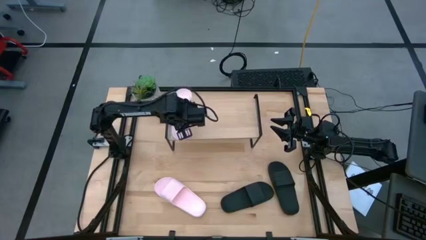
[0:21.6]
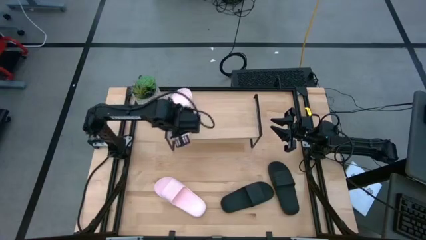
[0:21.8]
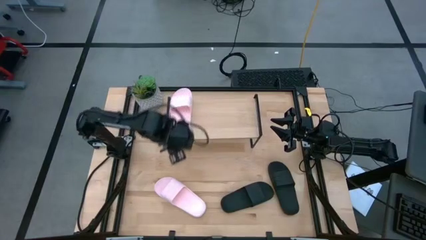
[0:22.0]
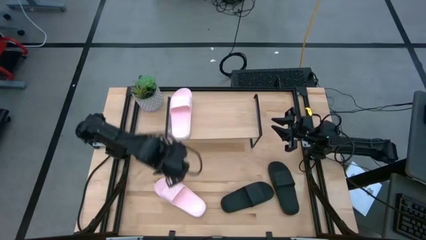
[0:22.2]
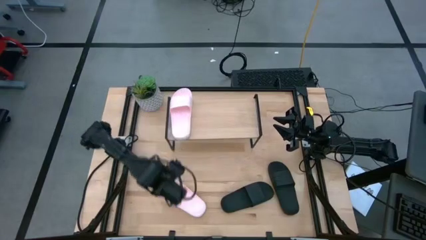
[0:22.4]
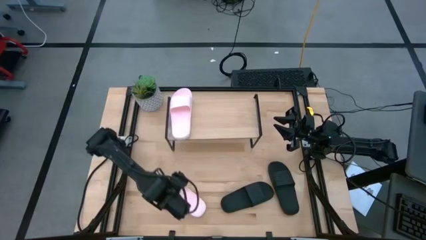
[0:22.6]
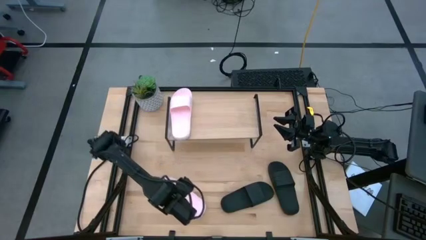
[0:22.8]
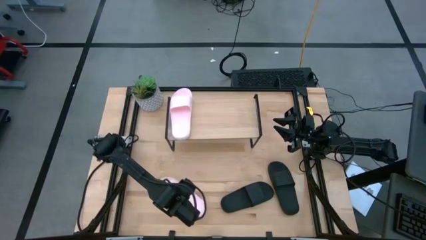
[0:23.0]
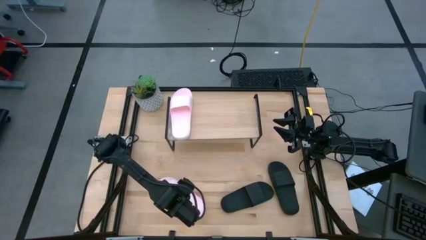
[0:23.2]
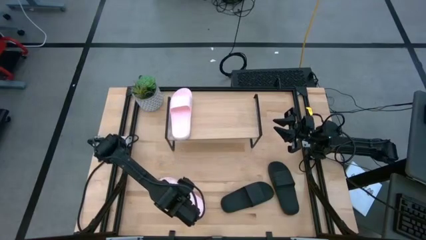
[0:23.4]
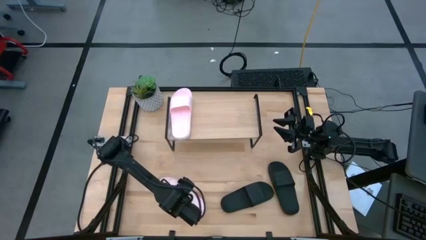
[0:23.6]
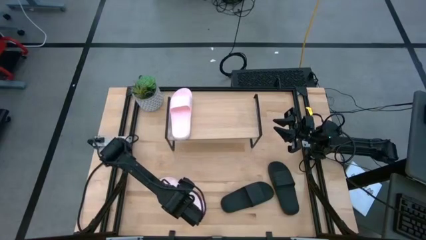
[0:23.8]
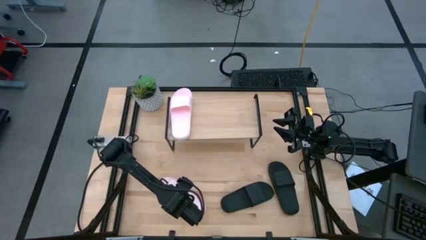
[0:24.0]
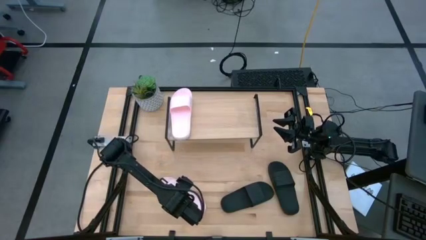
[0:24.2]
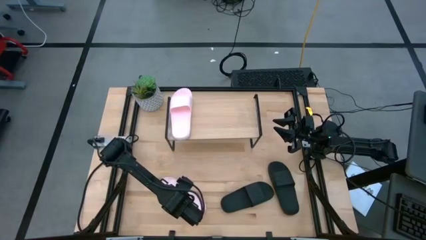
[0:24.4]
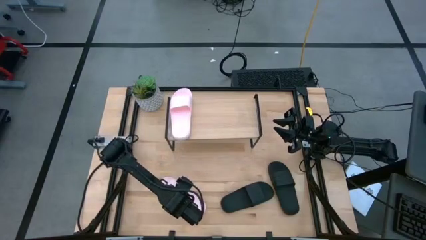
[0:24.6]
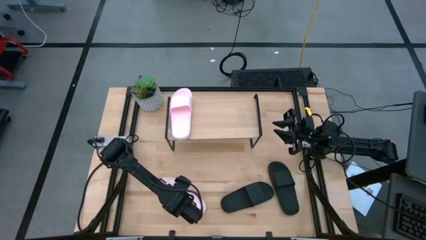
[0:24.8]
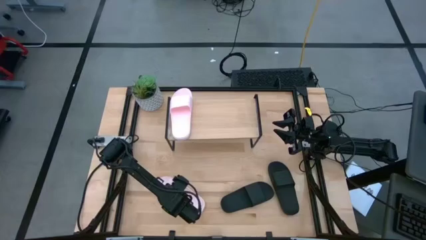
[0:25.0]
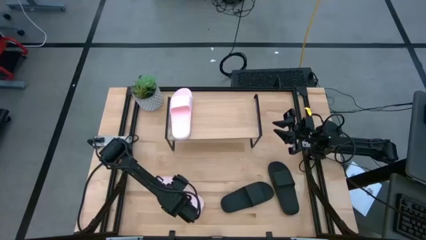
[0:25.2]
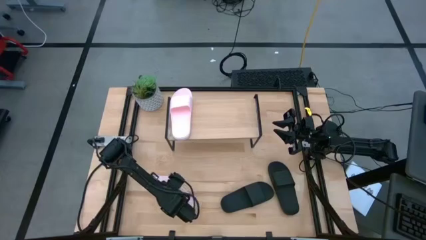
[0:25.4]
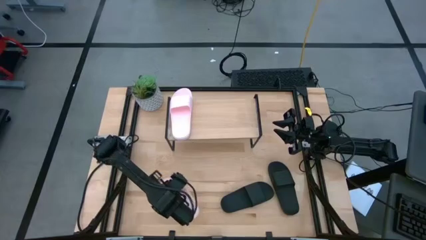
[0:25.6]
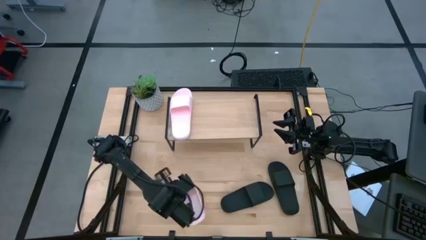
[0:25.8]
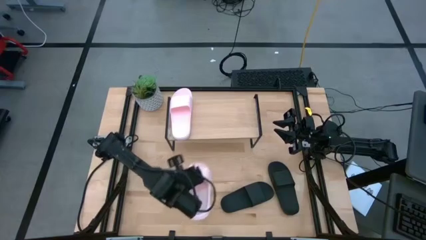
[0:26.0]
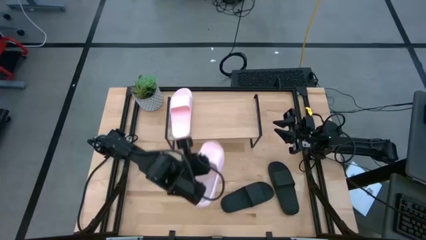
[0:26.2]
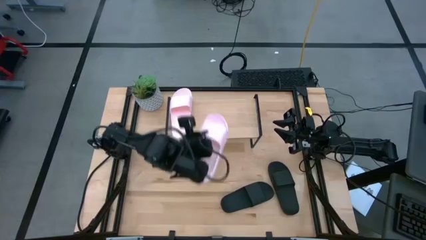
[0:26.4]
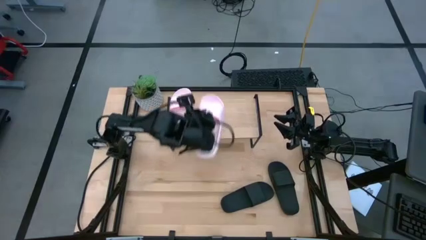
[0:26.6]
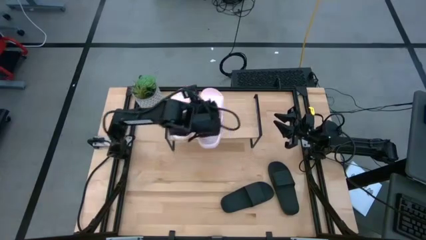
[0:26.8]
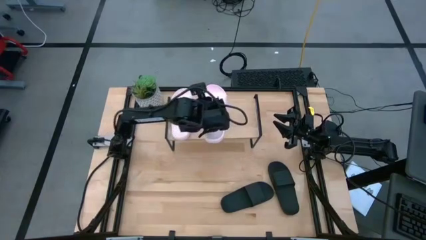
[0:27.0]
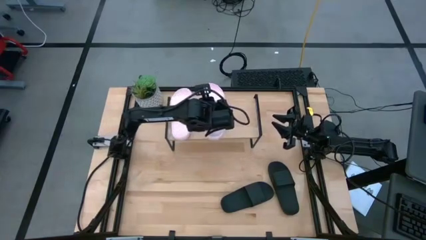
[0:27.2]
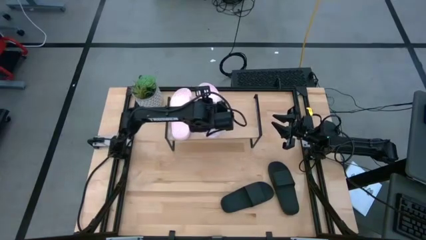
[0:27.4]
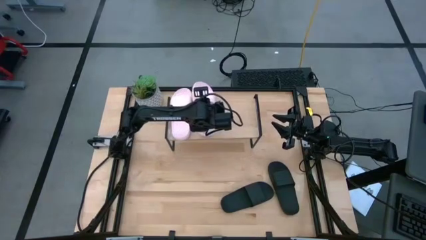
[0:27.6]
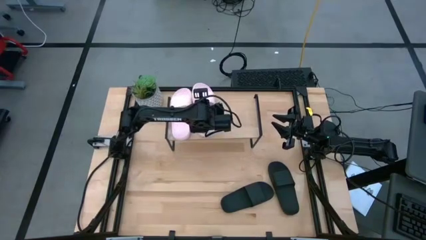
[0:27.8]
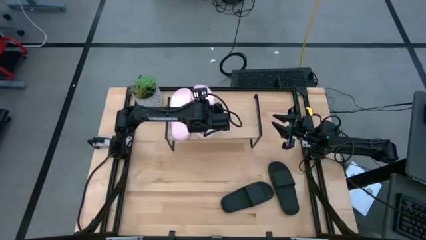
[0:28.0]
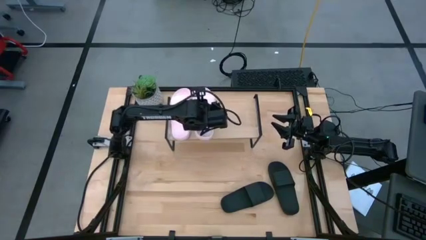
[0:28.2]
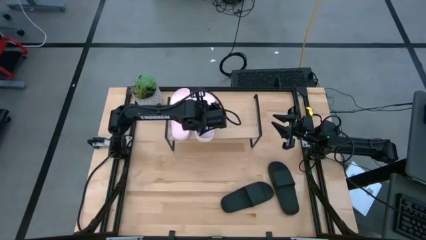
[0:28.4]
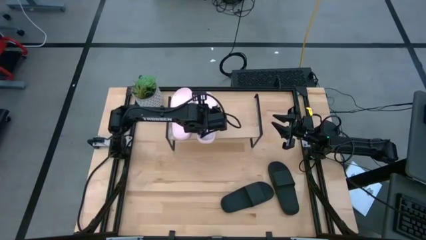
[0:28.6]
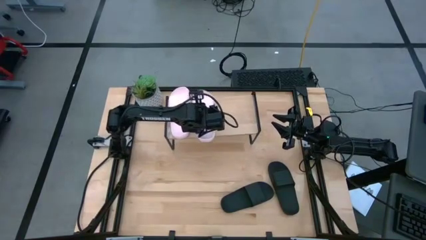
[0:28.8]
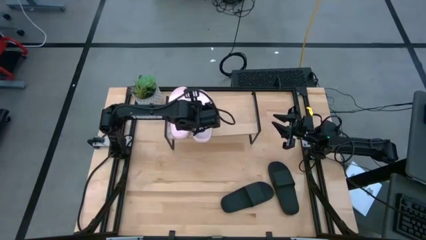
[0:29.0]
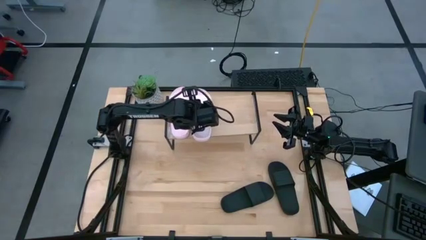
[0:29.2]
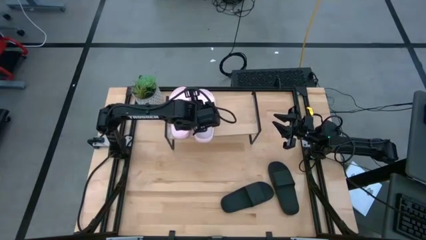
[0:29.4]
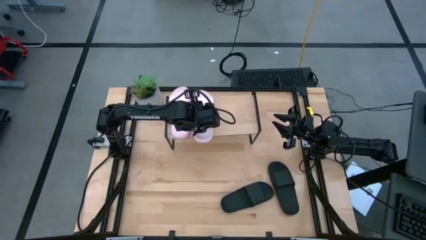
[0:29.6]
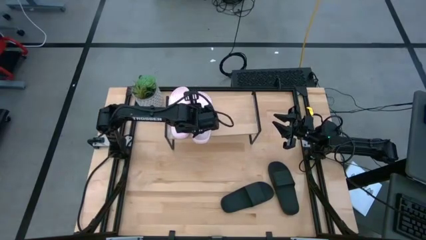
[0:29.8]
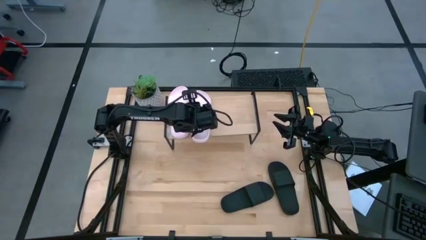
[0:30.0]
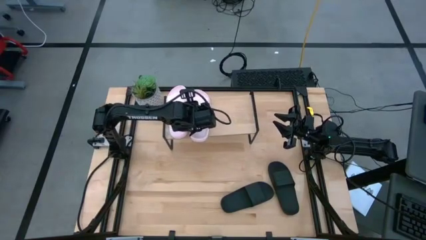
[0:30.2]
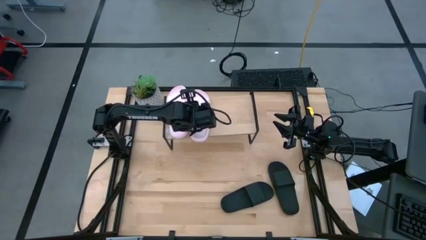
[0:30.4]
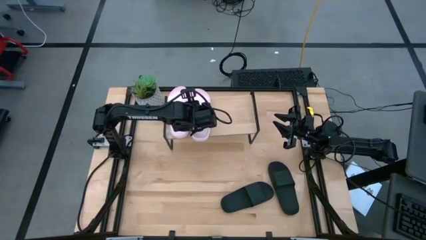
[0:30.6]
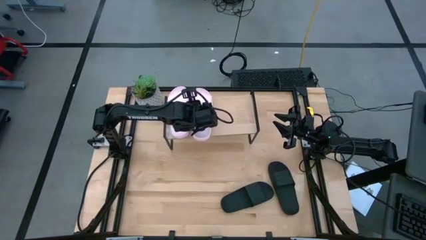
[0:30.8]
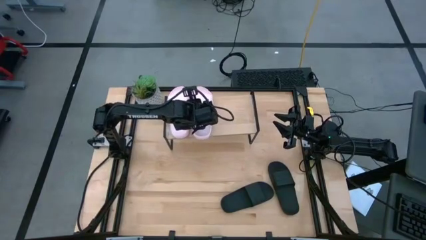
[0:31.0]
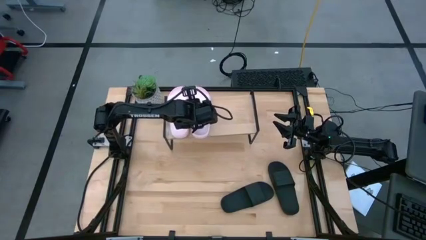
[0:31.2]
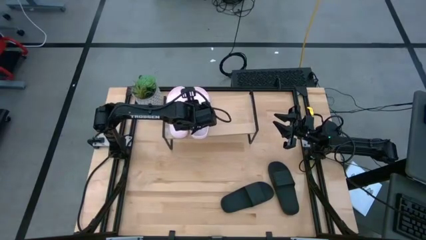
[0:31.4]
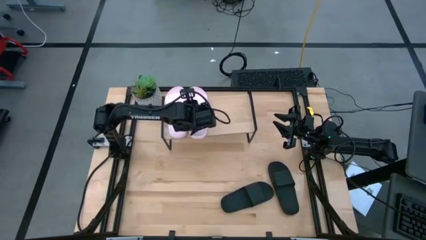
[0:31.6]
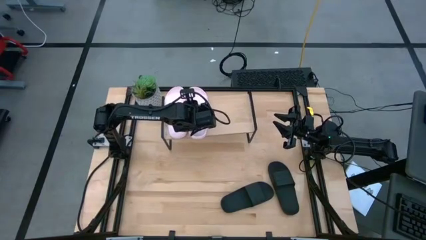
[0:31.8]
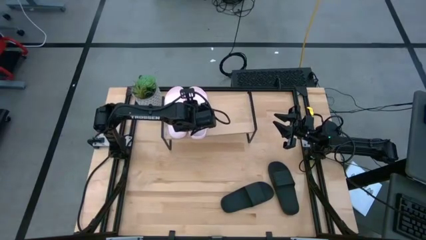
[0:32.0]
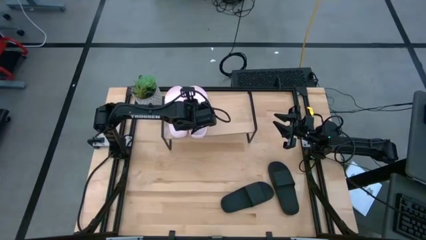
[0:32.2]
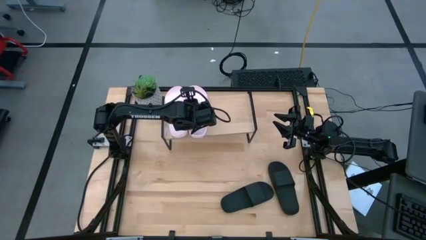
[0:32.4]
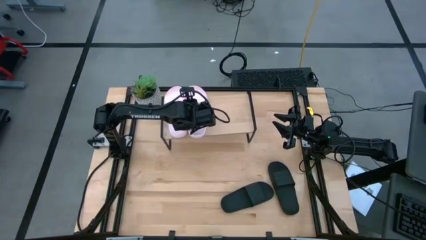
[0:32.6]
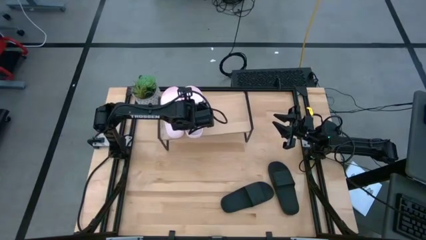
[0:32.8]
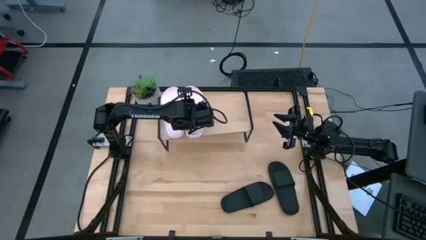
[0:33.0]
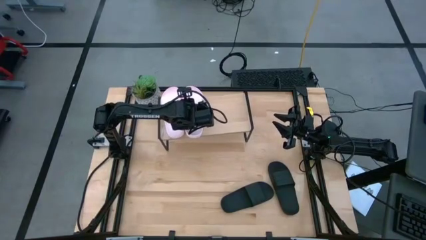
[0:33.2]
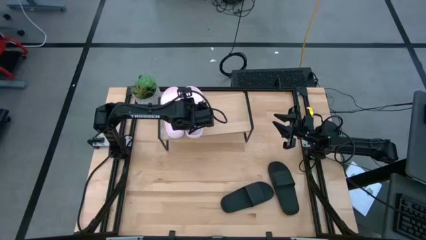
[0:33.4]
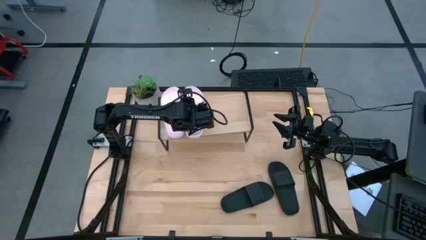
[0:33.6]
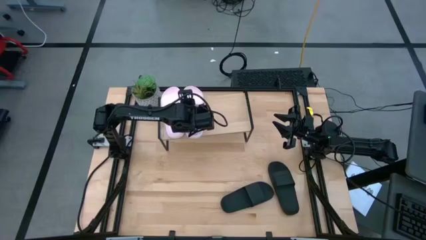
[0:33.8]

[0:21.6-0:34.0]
Task: Pick and place slides into the shelf
Put the pink slipper on the shelf
